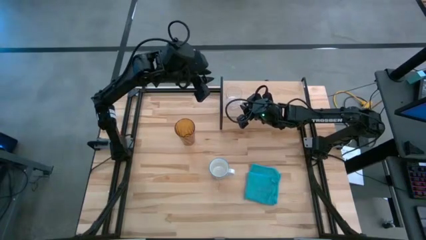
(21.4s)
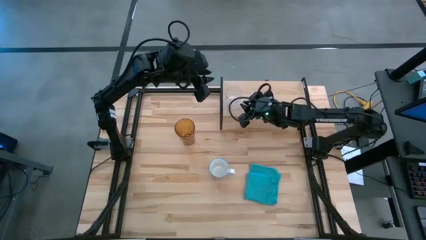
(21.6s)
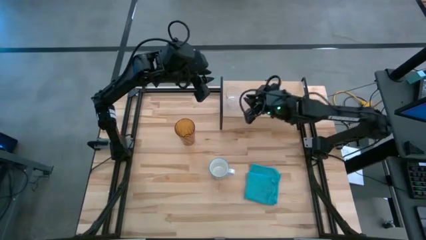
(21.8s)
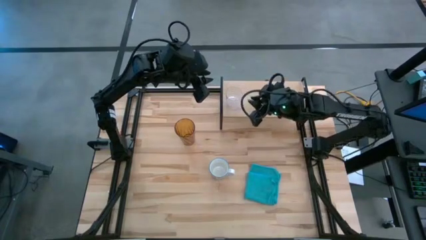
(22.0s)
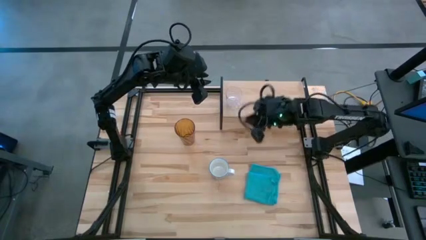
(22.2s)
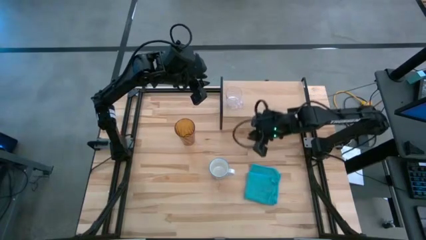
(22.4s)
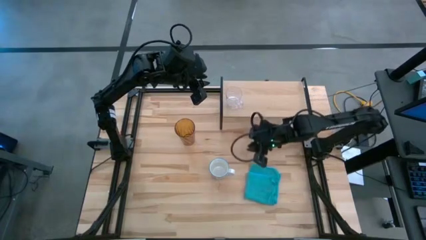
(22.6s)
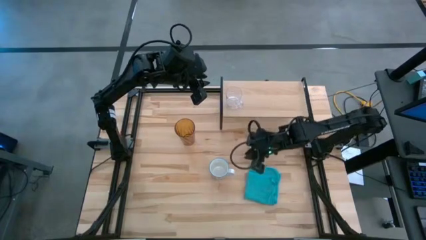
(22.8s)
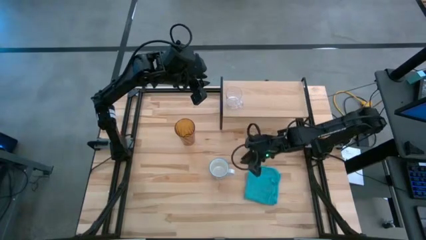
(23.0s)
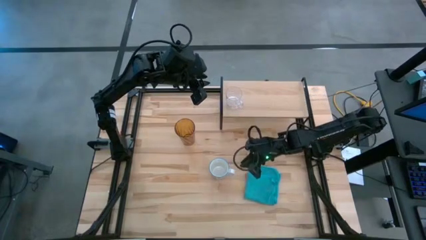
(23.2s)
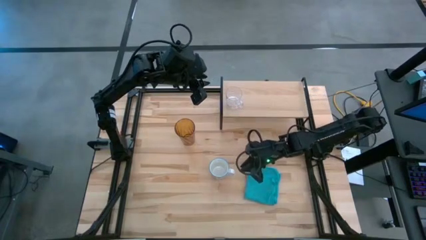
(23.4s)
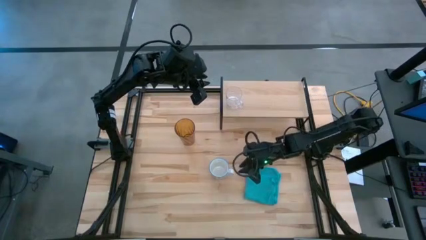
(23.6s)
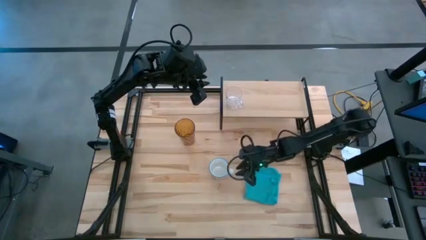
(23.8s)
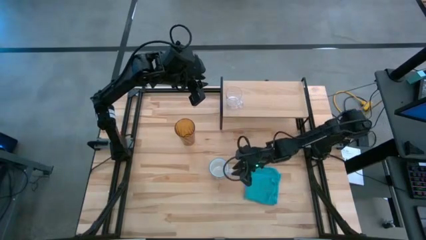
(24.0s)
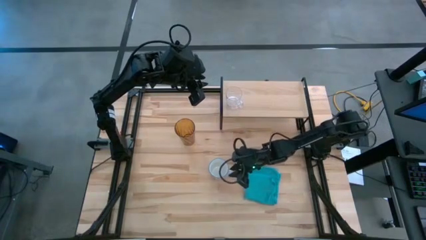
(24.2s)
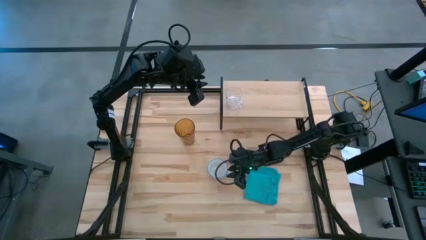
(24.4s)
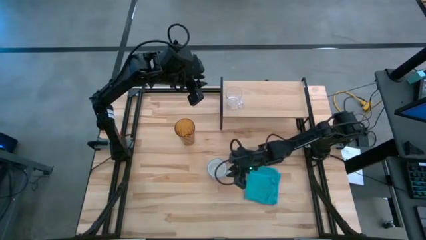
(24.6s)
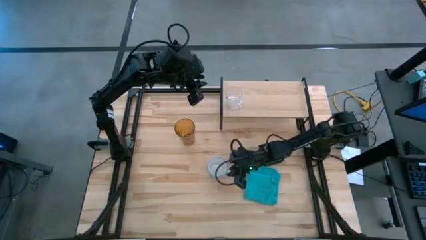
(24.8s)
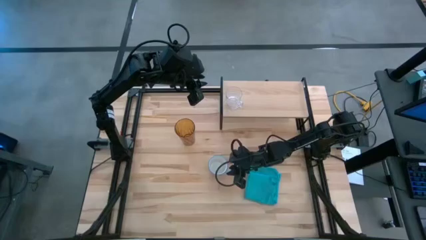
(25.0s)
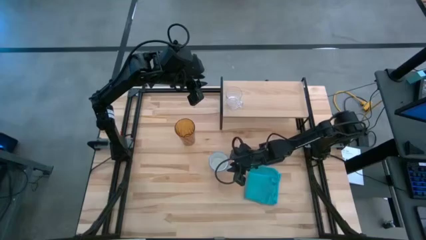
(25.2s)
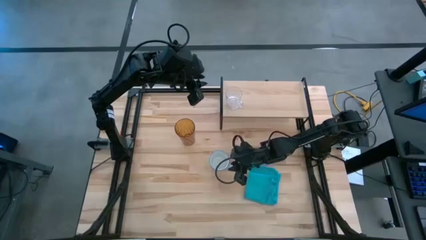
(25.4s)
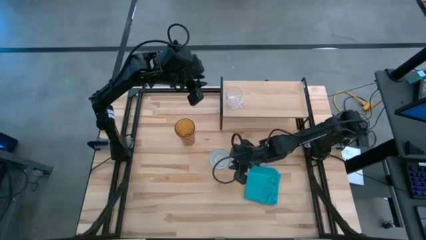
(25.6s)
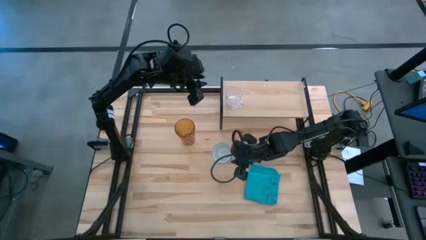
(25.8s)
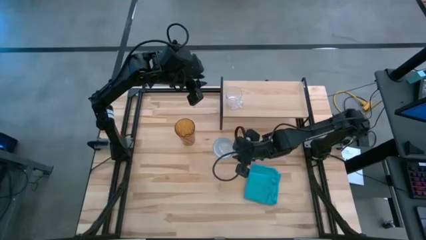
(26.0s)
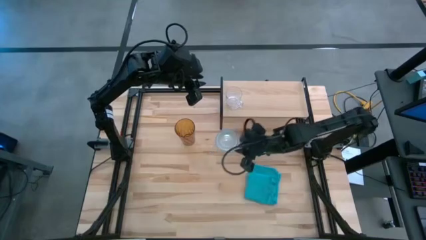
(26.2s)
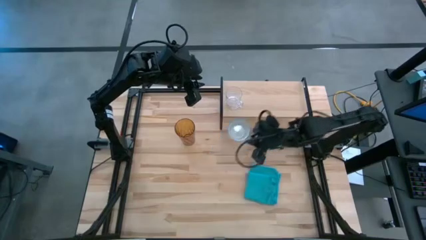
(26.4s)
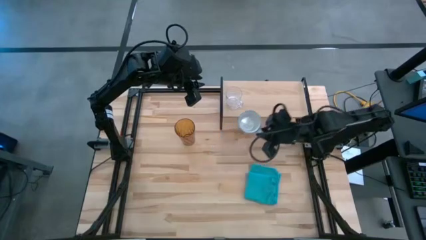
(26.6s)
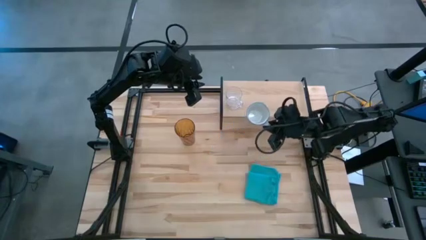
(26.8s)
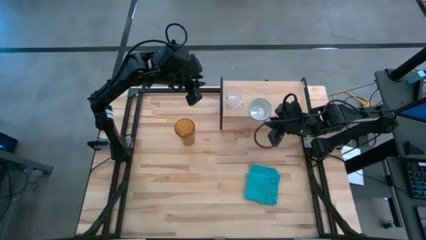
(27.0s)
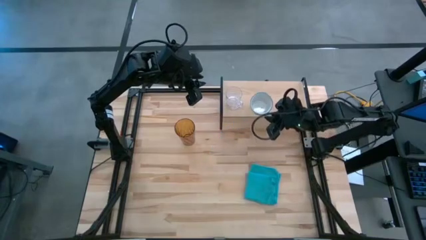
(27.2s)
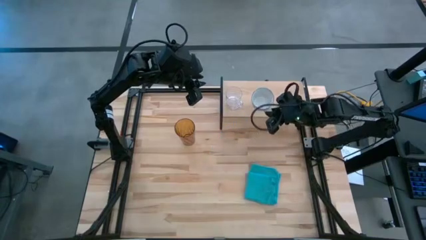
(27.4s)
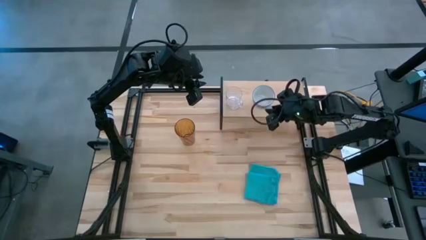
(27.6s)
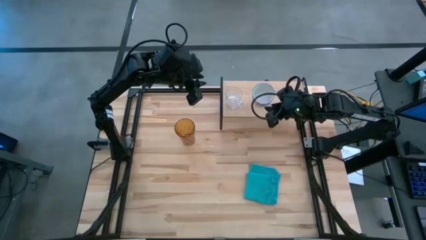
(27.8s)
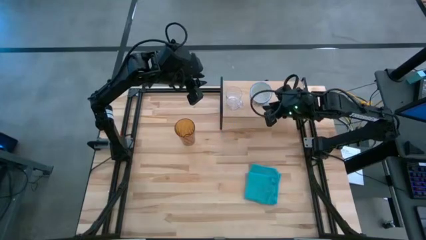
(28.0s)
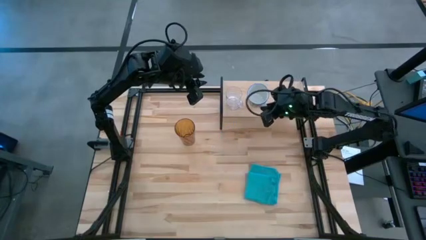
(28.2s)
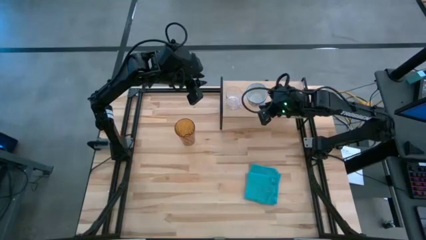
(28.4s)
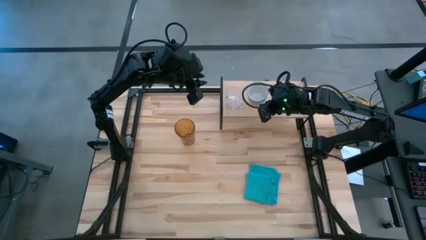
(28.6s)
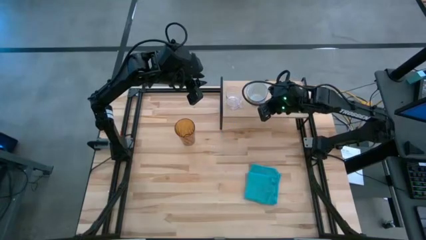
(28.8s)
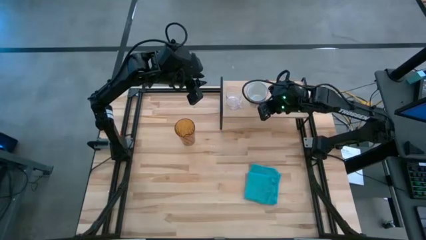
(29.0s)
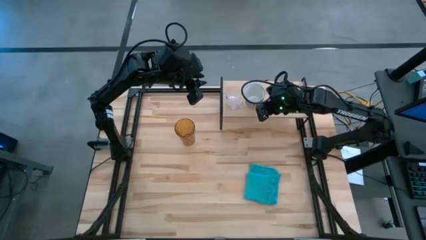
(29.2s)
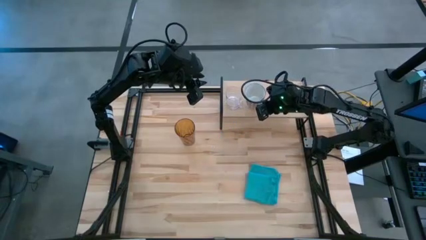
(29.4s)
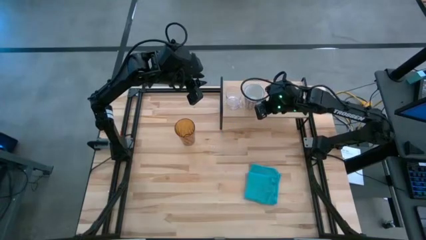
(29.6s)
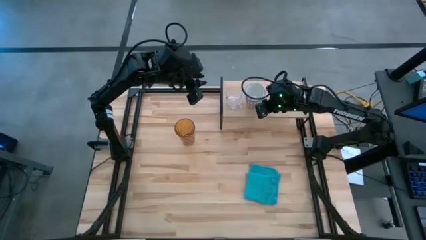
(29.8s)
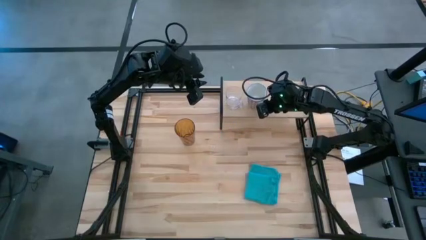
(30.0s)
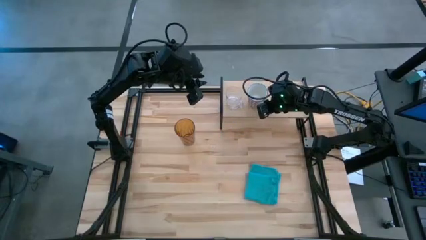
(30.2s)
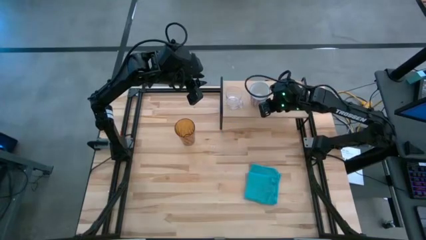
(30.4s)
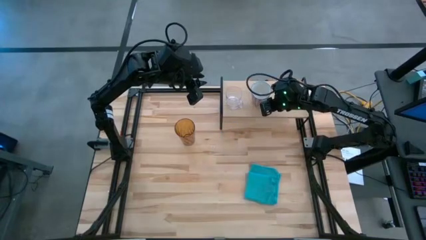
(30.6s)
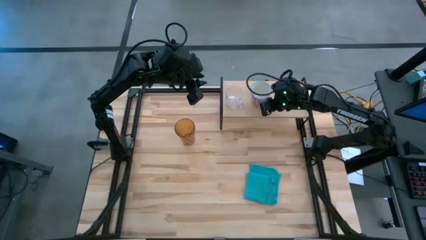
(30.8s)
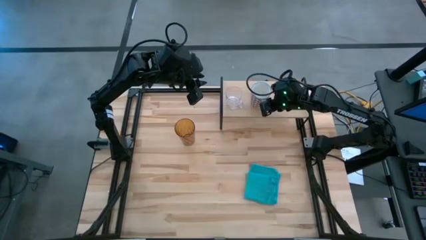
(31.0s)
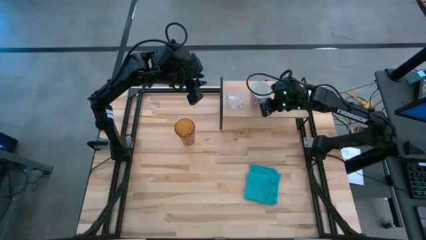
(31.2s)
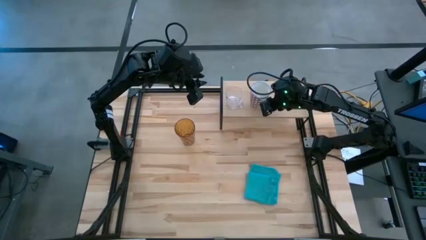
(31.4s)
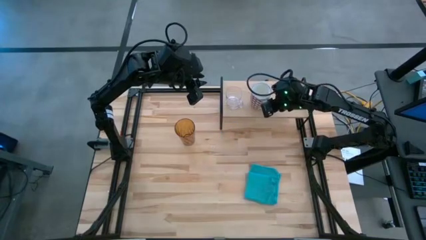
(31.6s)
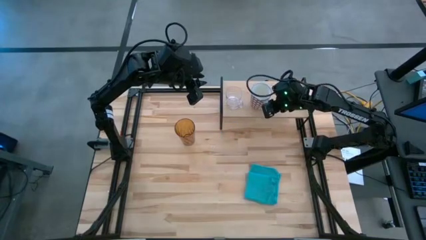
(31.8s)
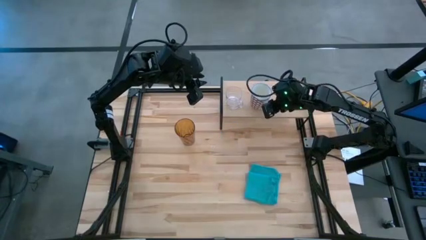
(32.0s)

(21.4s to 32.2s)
Task: Stack small to large cups/mugs on shelf
Put the red mug on the shelf

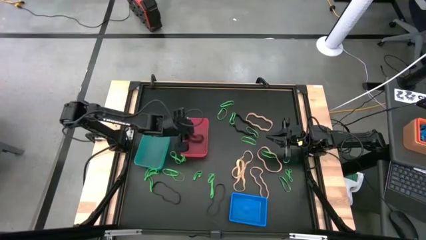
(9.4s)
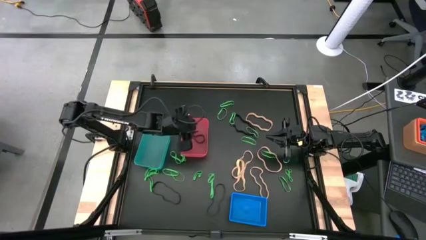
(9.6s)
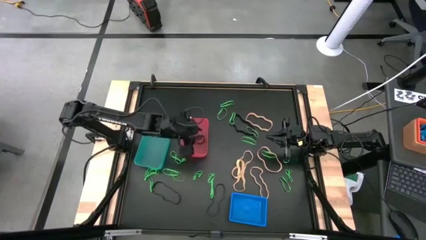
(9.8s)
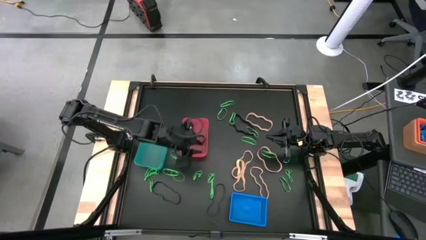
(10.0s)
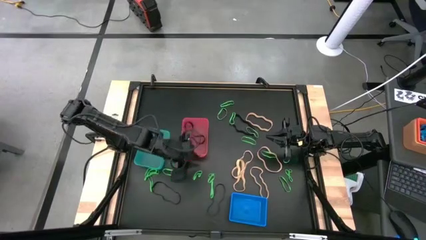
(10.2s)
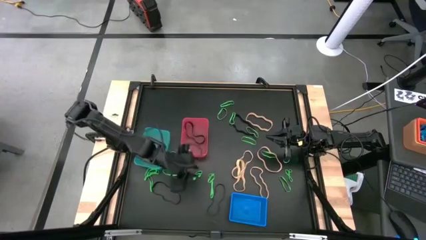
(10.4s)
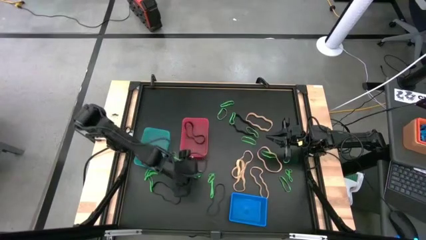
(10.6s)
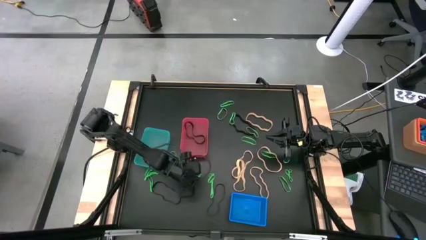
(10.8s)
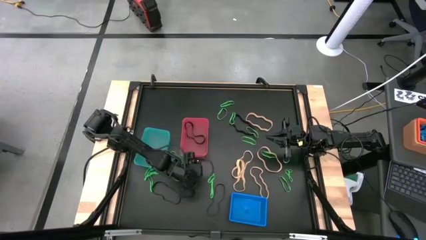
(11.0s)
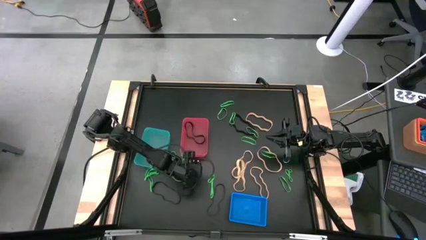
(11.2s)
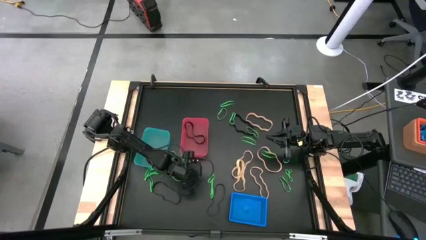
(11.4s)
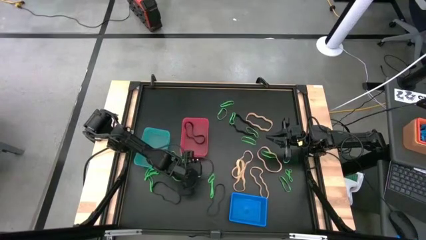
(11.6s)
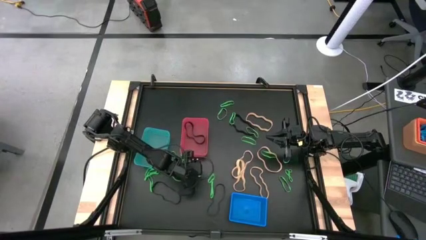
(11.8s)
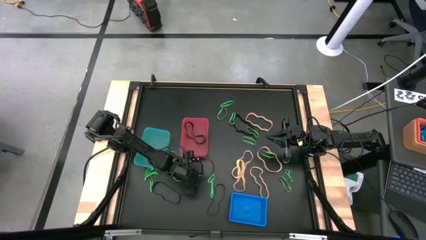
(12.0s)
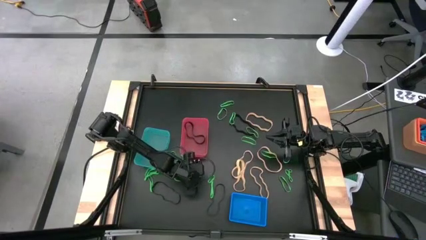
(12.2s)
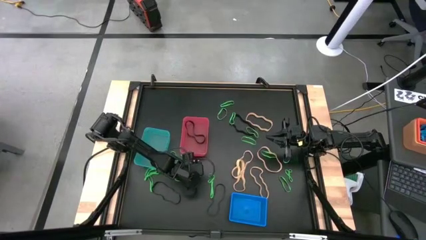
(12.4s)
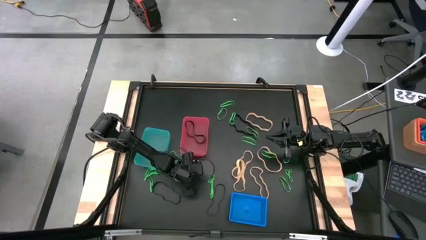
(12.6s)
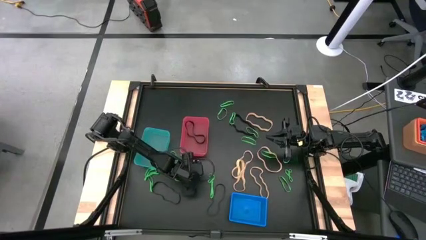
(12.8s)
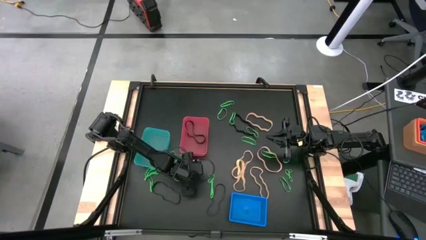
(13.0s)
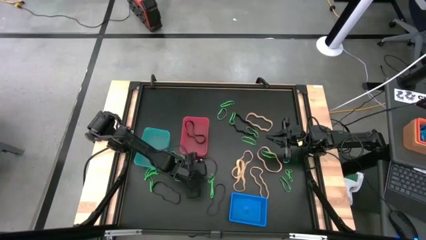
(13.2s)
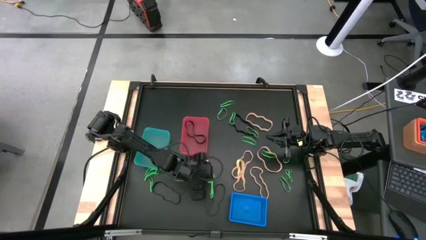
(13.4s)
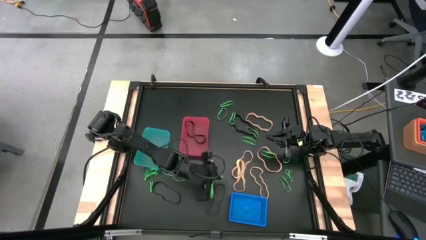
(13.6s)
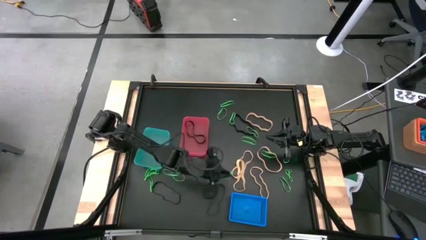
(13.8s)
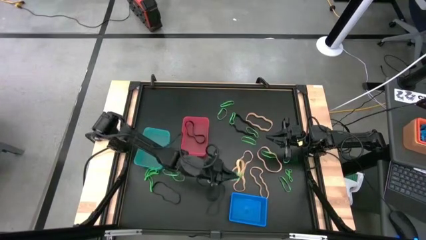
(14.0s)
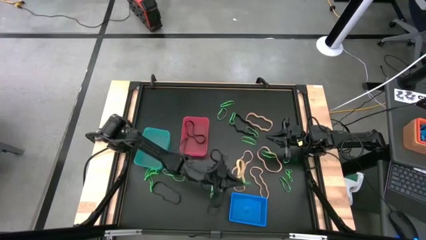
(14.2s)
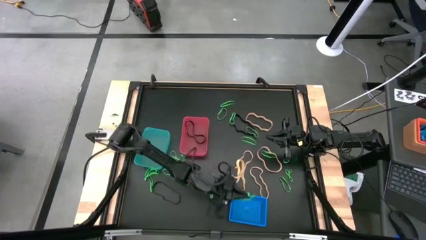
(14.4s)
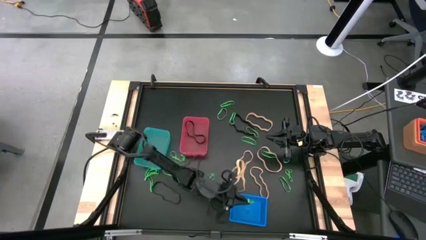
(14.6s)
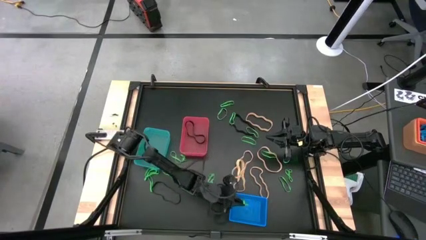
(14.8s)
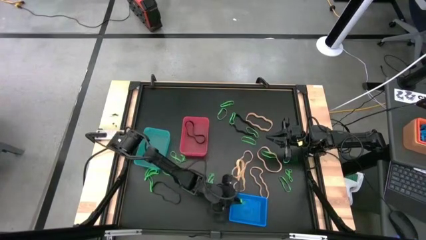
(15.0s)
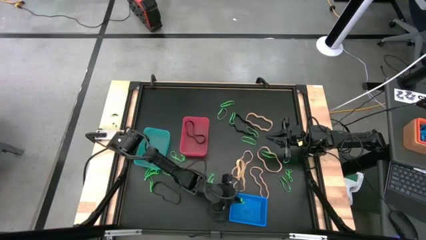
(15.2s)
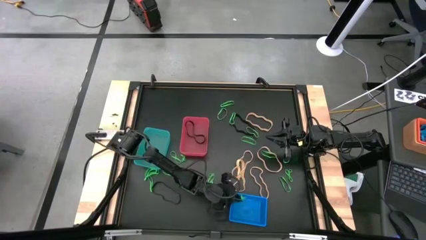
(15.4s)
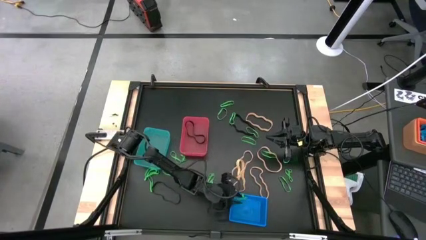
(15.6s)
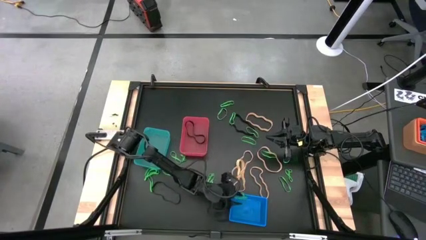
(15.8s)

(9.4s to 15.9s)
Task: Sort rubber bands into baskets
Put the green rubber band into the blue bin
